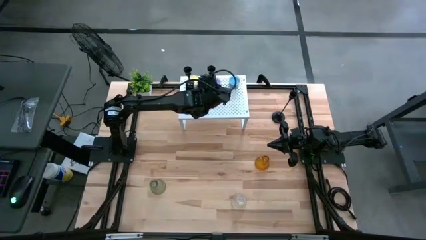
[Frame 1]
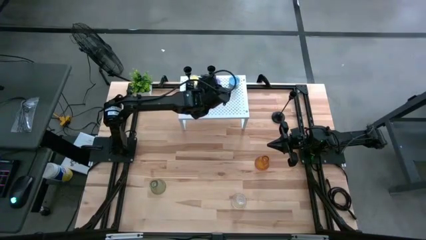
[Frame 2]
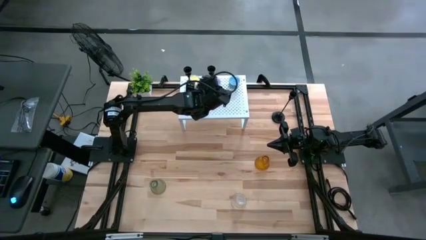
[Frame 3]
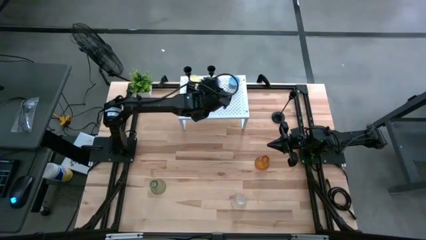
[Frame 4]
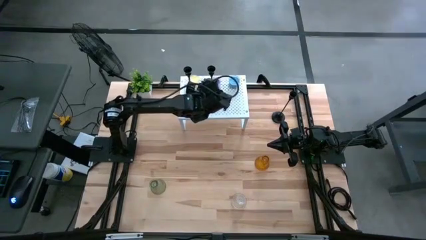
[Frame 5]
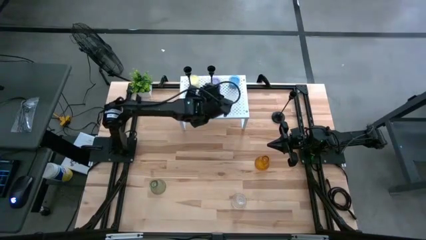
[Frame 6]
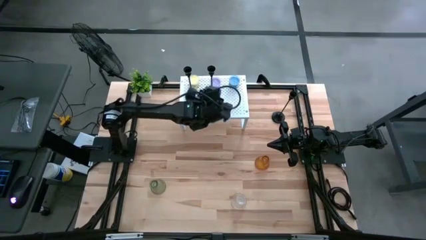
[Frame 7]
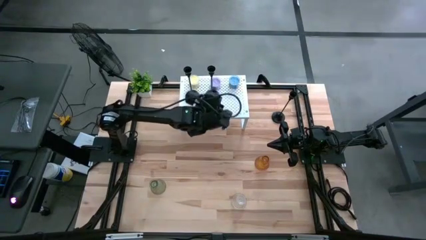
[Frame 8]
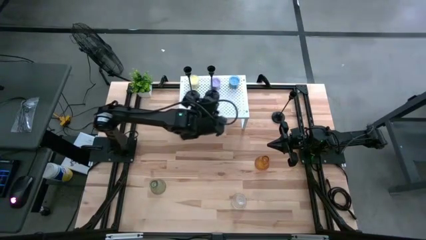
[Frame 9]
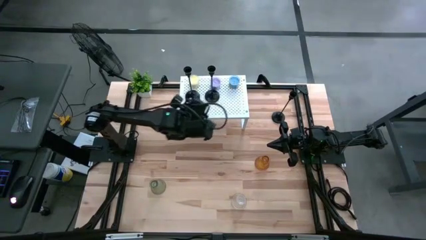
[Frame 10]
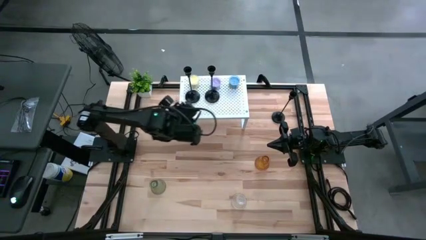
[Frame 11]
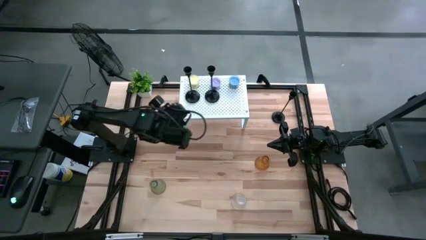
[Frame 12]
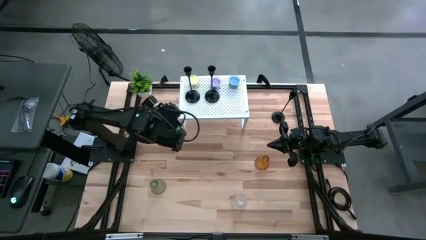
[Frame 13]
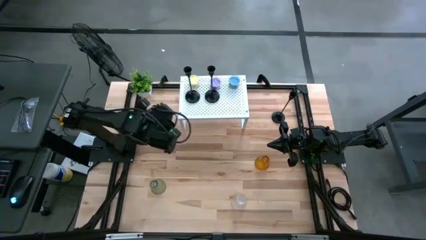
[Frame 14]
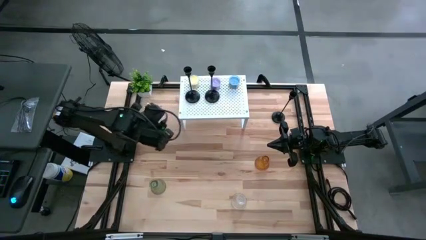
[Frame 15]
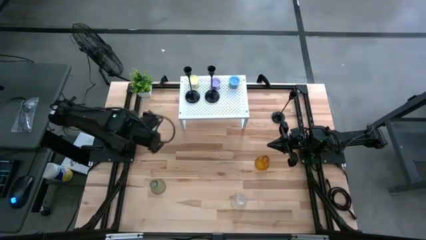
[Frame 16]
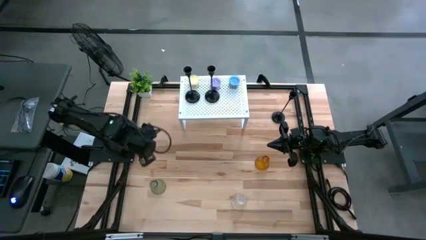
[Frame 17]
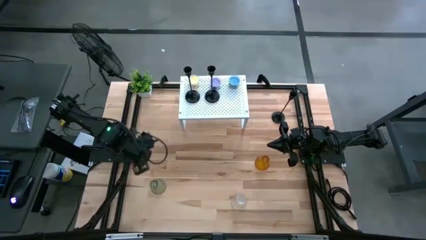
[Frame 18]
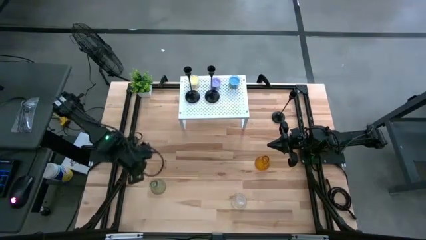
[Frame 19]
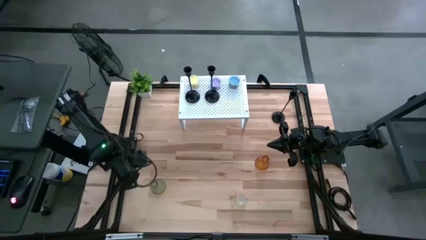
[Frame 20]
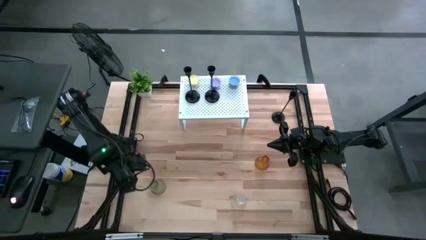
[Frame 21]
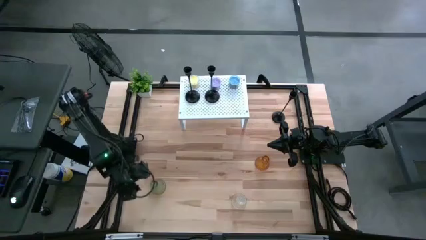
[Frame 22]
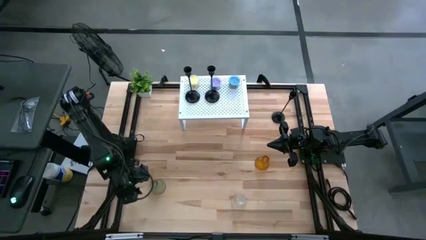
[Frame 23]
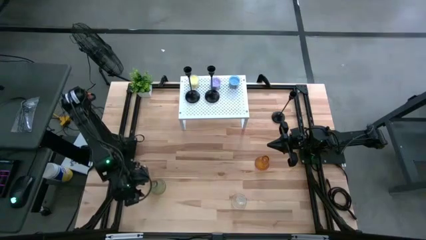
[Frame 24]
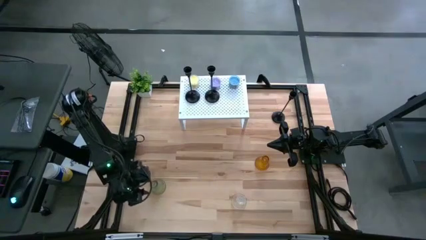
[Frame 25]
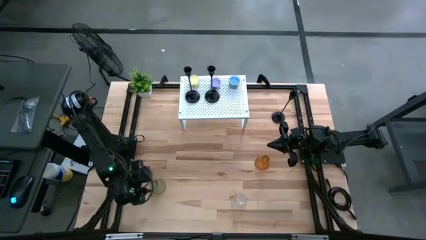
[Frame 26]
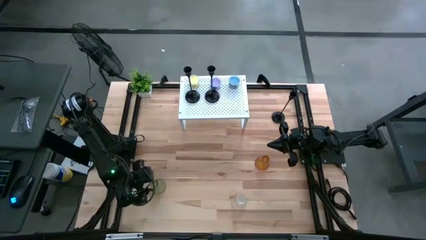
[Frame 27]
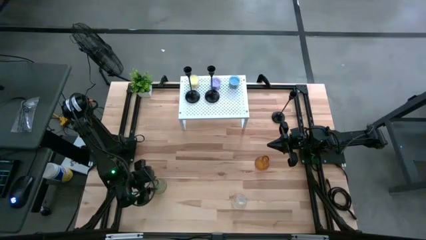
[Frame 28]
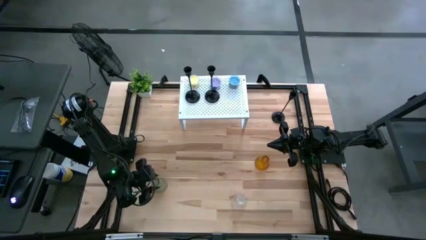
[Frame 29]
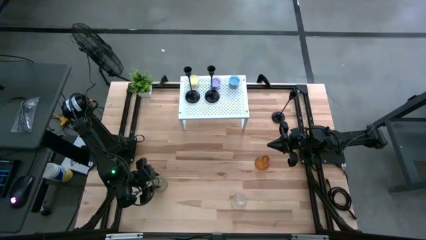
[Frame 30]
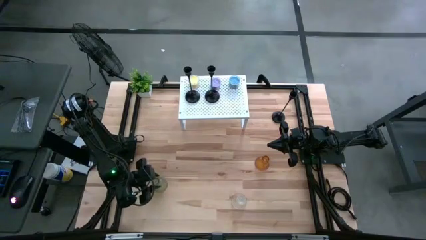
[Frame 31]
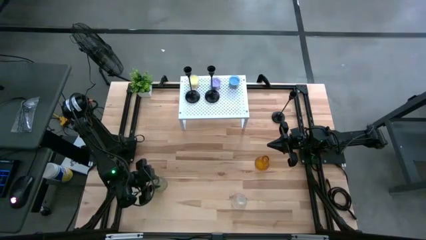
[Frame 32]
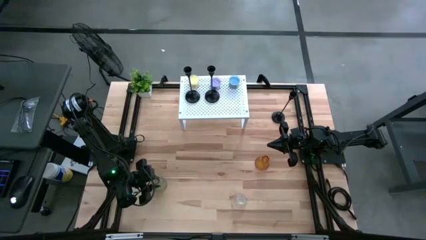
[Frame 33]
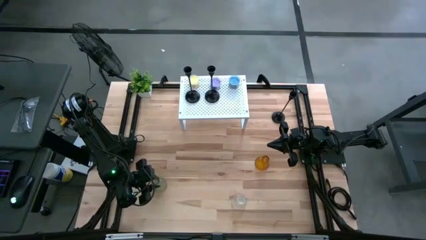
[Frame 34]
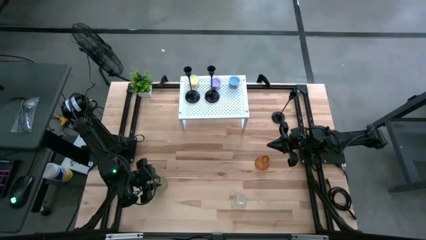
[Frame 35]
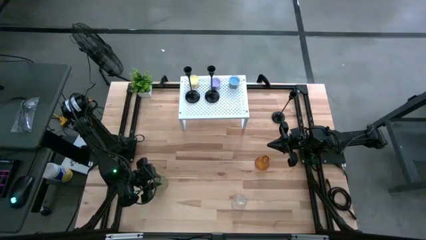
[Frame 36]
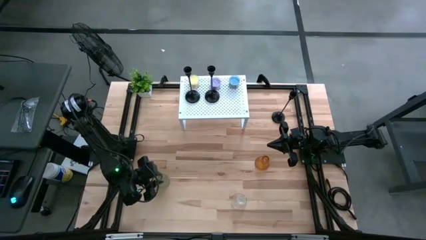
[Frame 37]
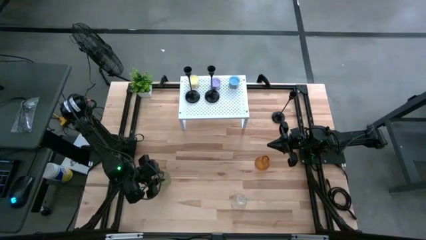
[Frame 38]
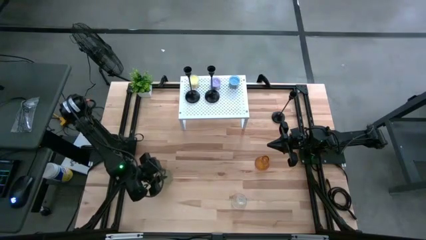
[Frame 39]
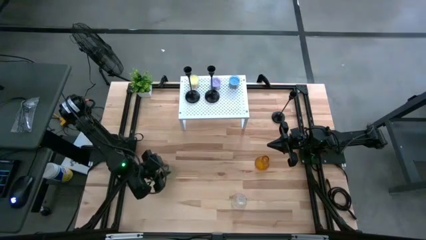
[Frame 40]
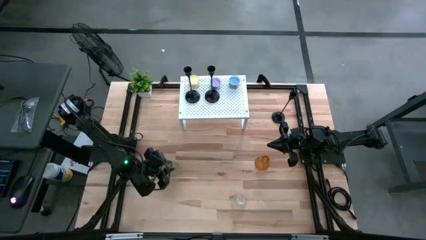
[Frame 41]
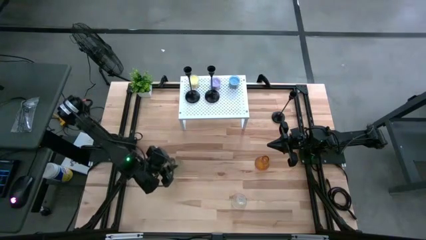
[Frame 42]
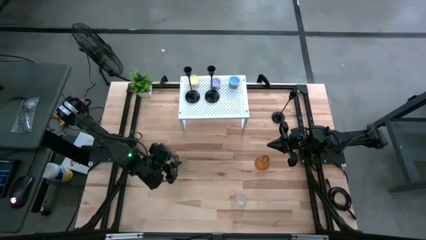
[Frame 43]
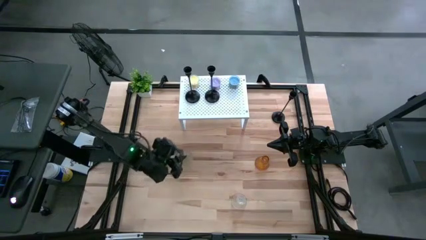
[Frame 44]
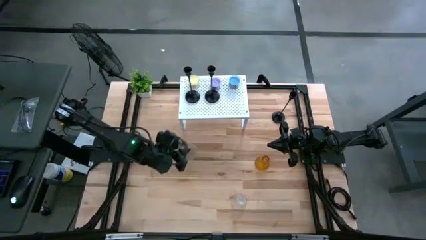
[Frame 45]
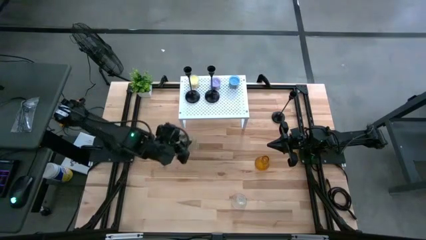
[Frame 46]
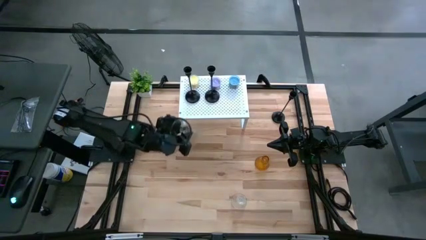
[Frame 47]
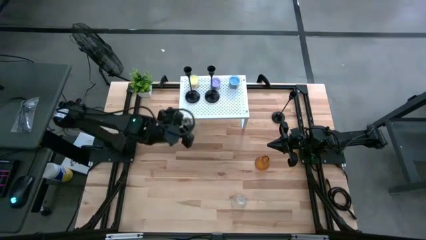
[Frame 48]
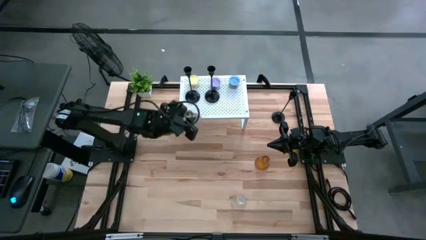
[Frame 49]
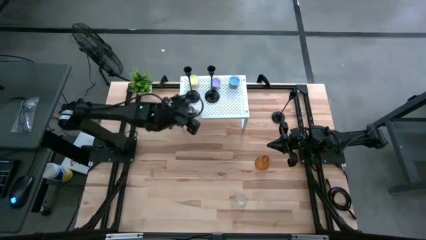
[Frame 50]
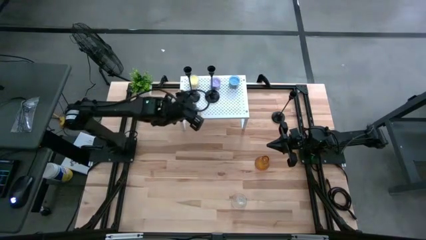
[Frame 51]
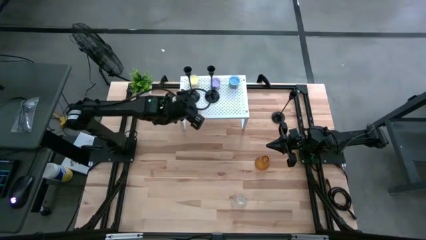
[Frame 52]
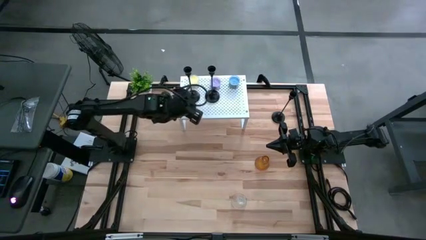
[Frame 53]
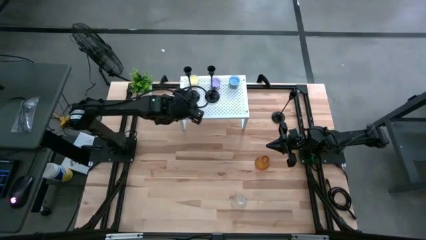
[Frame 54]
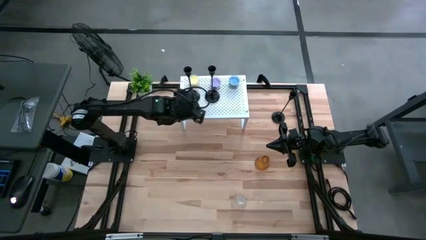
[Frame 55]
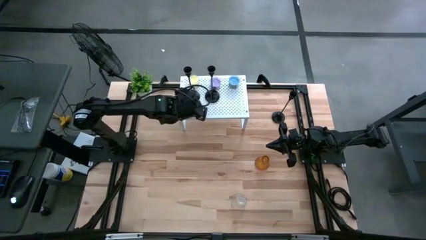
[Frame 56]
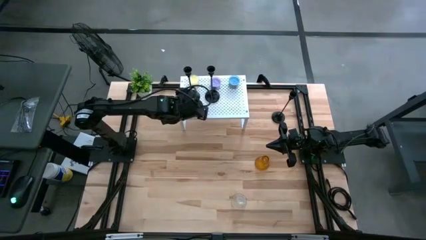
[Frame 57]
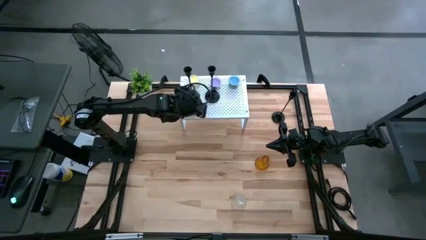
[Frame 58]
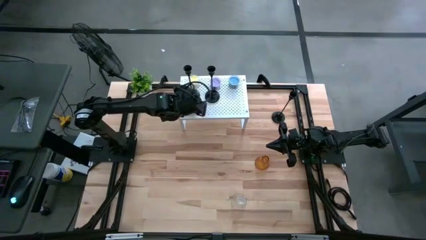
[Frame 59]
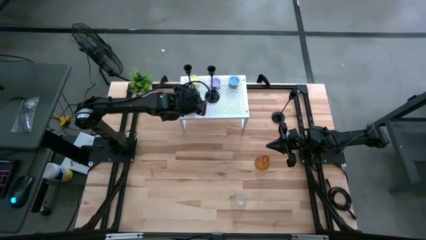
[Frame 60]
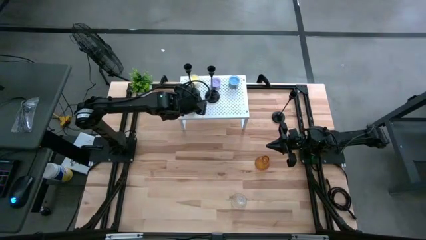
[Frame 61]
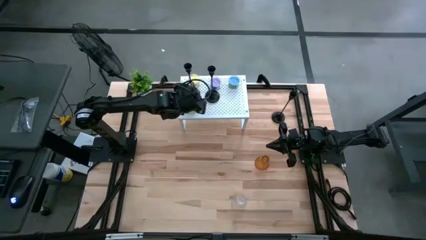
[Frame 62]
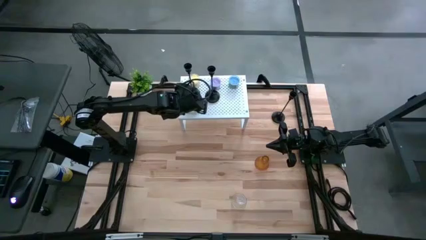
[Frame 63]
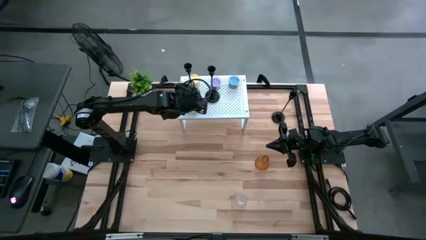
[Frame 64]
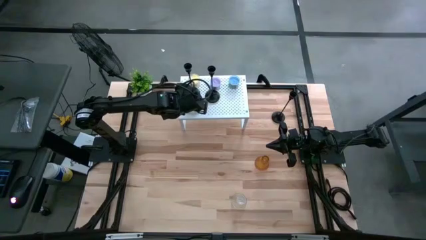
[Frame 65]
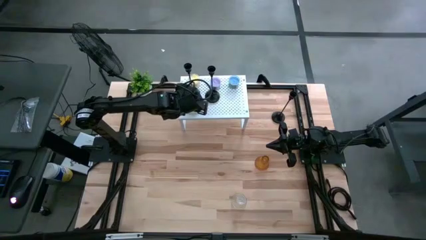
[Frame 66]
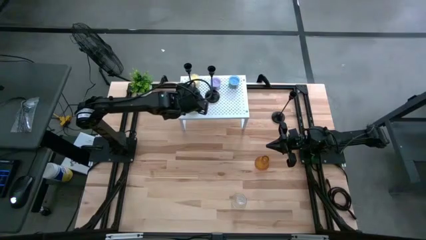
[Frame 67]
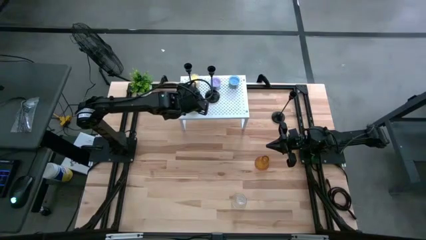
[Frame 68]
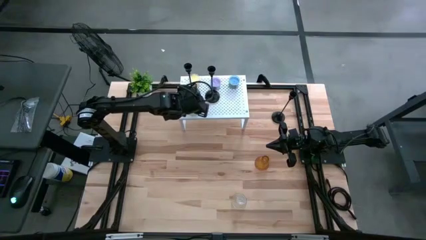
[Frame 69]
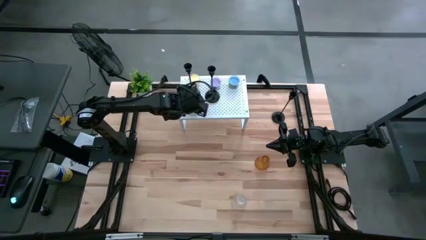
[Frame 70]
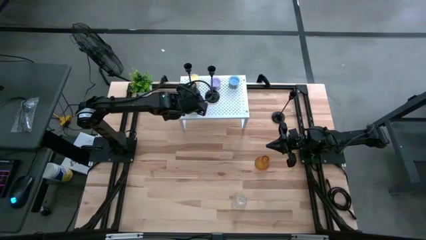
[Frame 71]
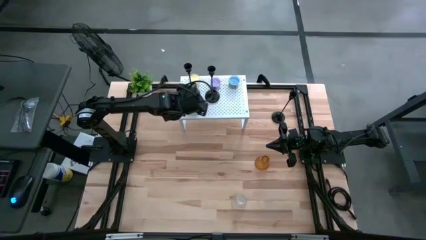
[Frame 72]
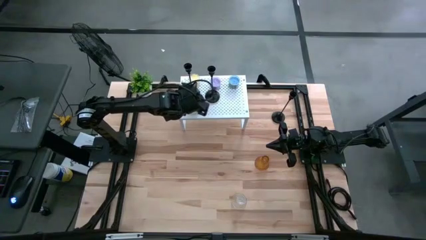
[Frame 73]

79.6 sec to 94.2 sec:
Task: Pick & Place candle stick holders
Put the green glass candle holder on the shelf
